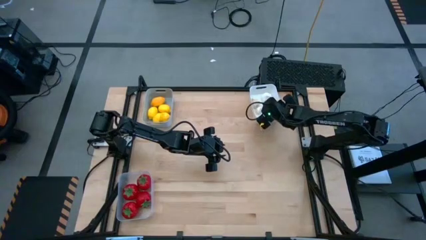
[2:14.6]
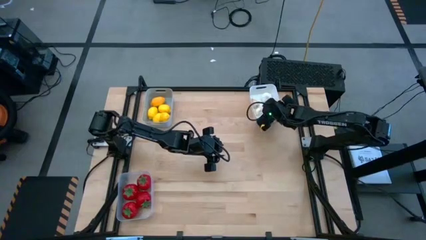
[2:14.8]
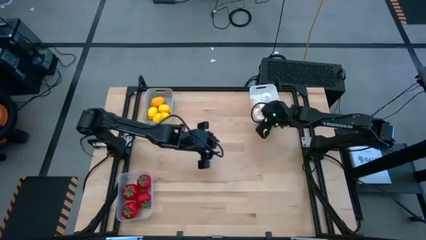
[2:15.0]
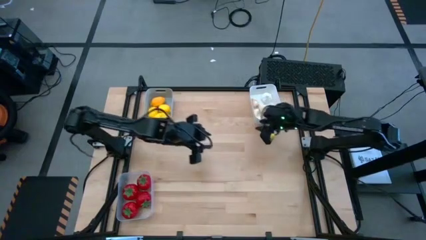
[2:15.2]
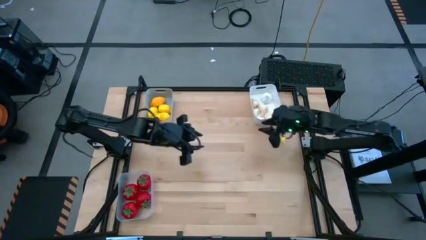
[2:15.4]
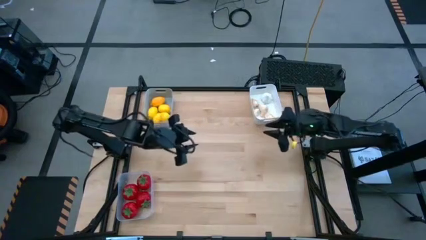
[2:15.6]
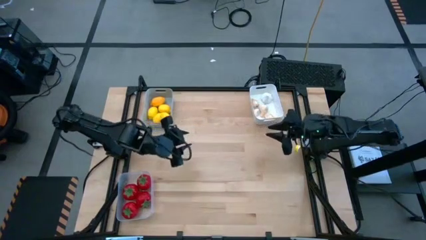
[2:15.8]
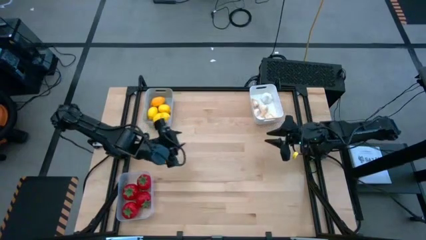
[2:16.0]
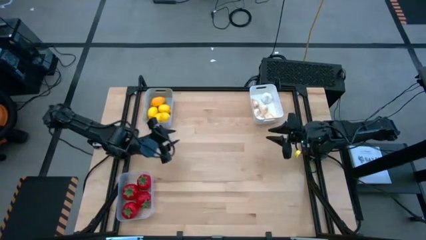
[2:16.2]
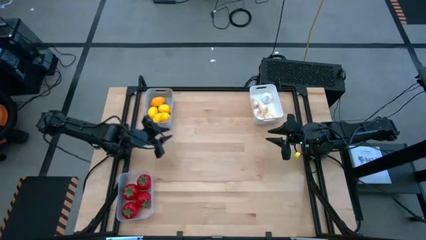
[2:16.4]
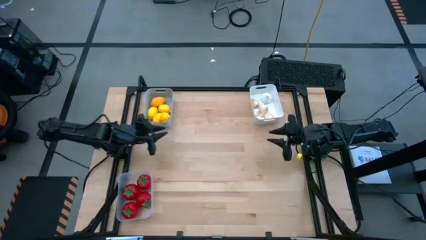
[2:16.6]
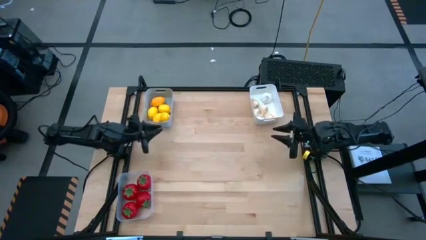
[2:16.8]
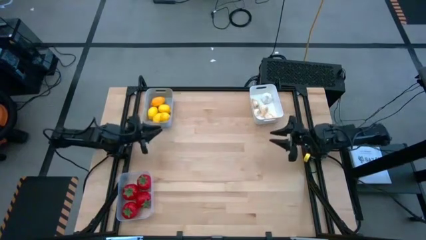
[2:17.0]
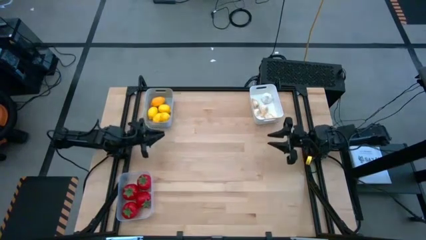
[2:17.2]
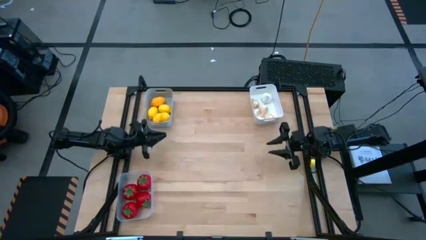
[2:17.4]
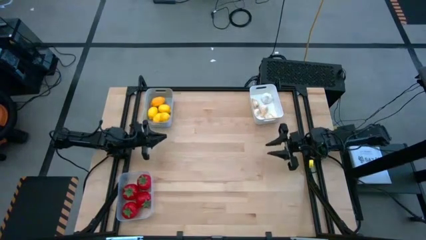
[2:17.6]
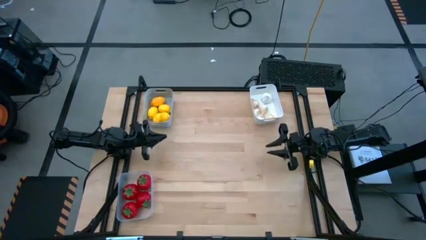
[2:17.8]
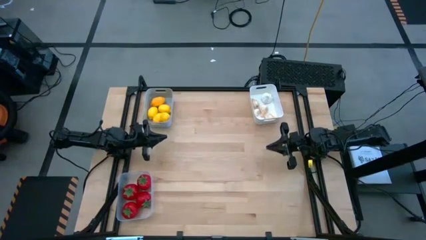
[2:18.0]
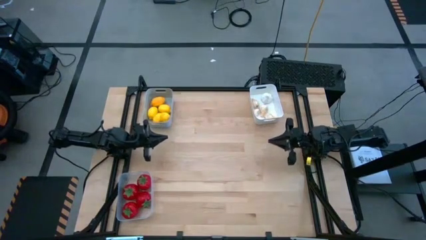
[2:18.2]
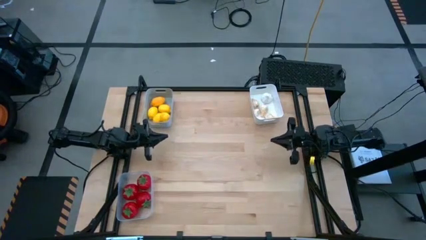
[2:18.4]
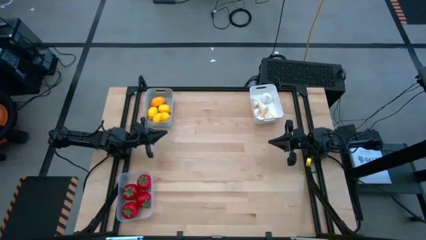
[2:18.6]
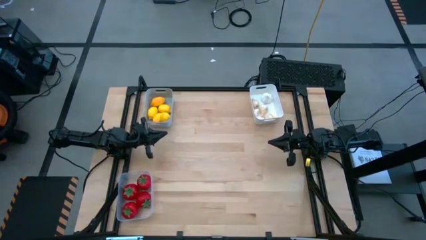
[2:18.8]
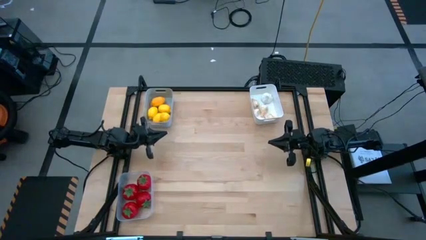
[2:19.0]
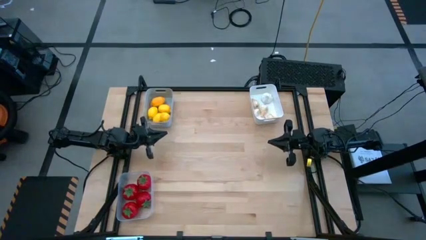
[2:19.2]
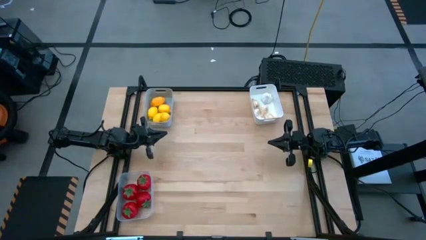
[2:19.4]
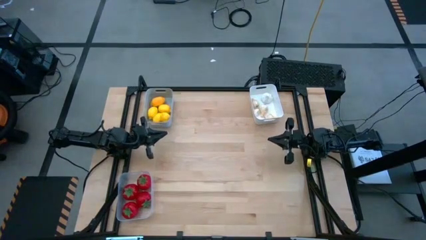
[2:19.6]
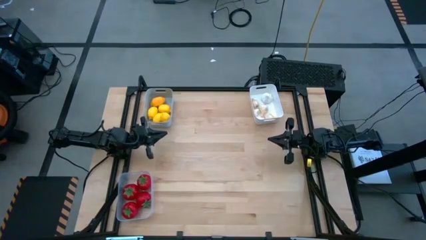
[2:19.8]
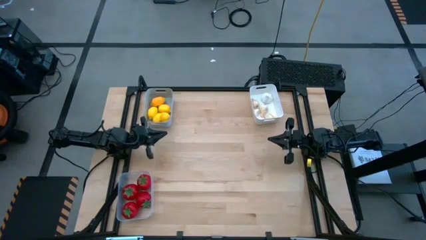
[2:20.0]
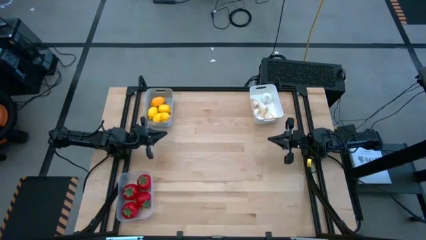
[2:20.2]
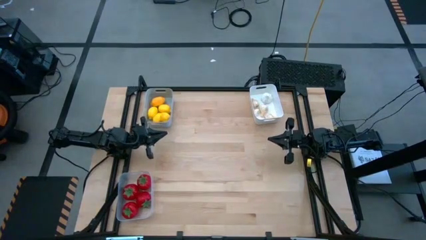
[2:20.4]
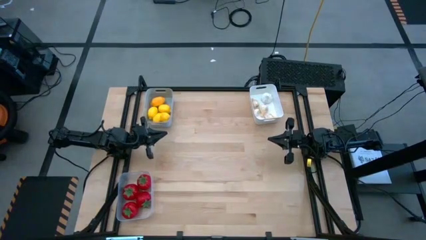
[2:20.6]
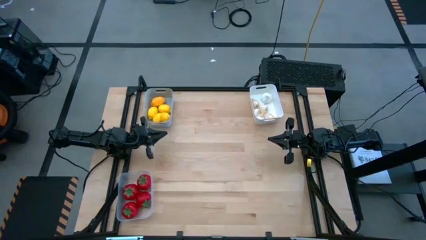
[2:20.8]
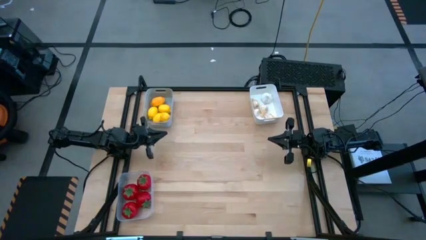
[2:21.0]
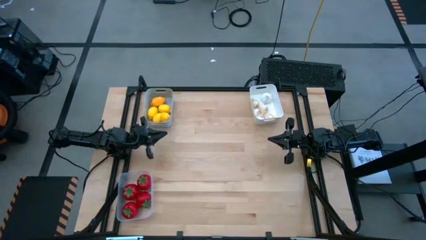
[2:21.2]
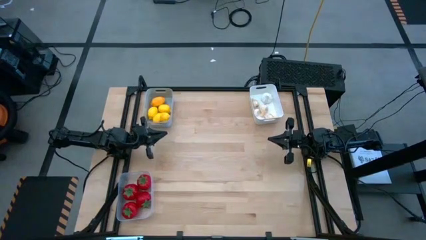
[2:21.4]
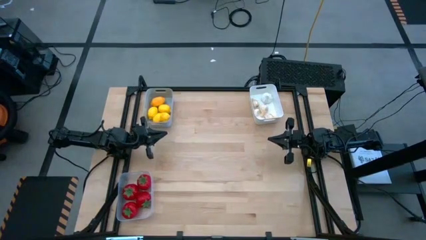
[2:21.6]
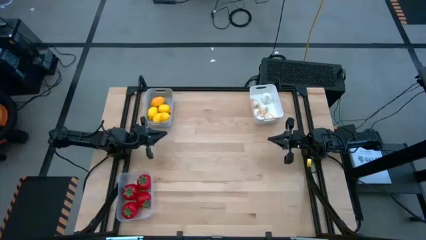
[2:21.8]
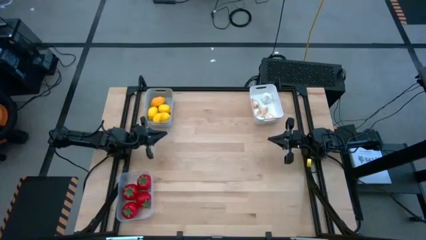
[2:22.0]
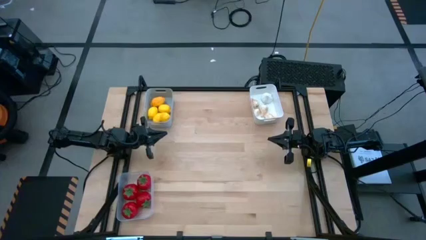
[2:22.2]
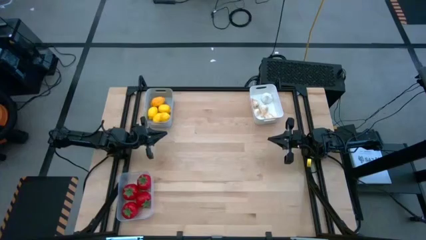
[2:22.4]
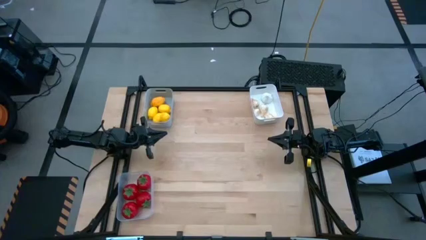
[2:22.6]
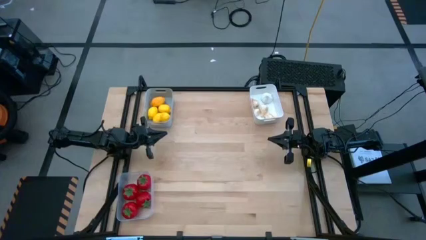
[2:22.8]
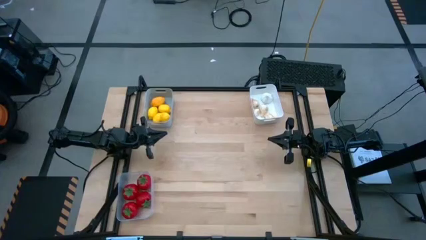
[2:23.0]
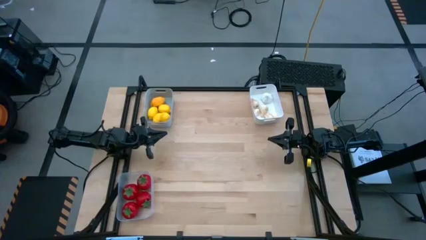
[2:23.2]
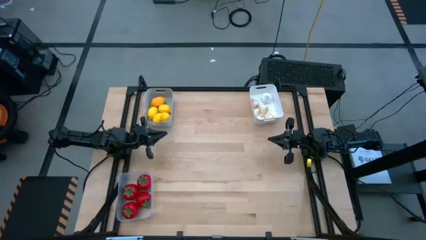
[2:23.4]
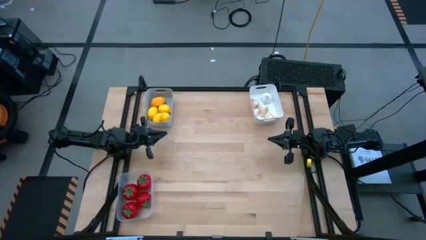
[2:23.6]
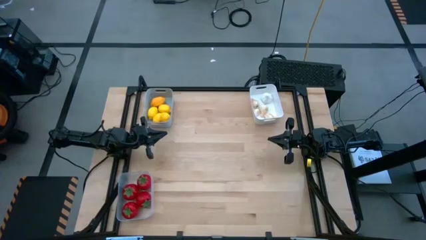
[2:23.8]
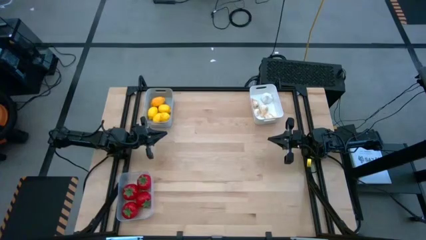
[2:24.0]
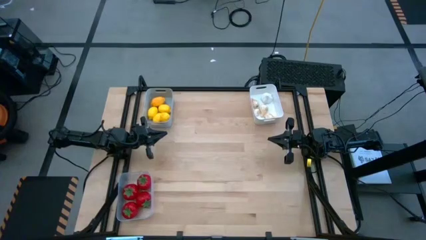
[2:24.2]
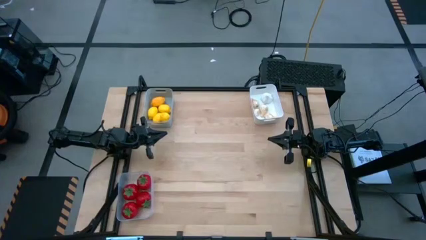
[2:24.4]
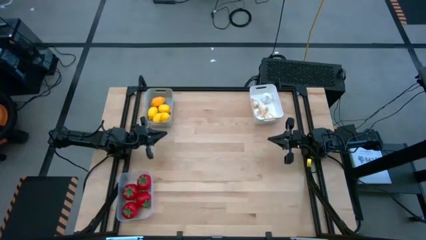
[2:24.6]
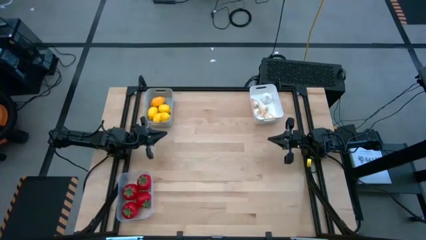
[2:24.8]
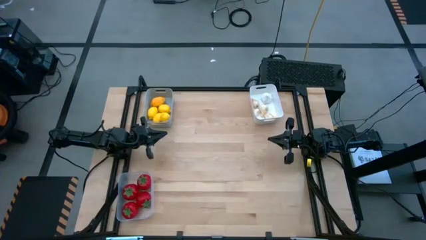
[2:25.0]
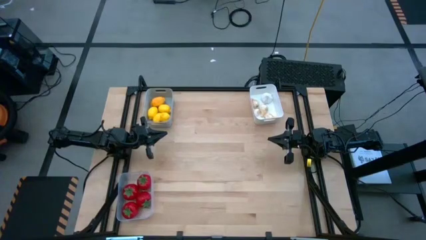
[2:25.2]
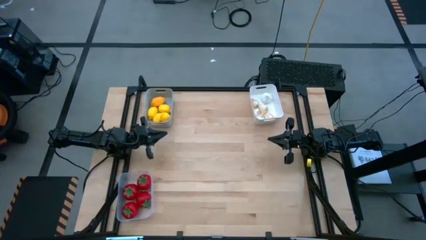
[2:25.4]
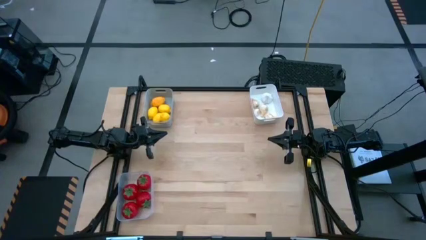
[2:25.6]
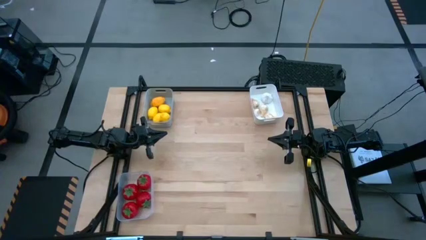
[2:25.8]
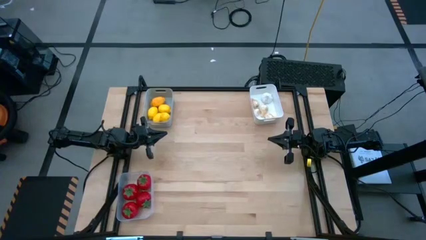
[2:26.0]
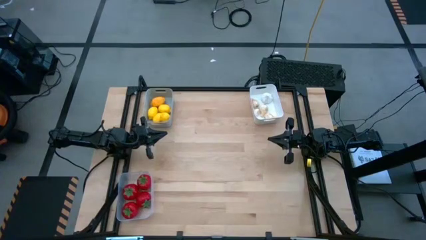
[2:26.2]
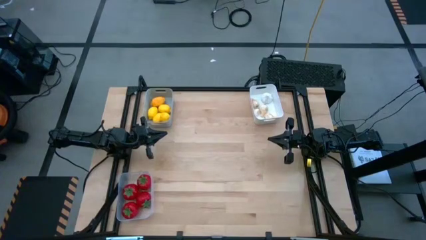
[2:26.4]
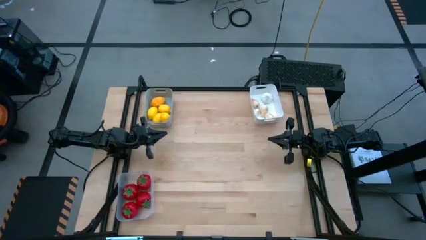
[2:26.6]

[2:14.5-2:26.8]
Task: Sort produce into baskets
Return to Home Position
